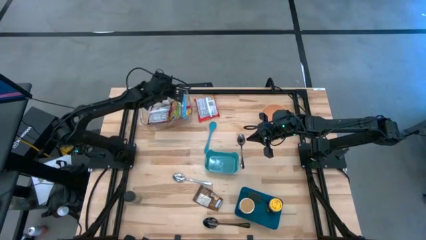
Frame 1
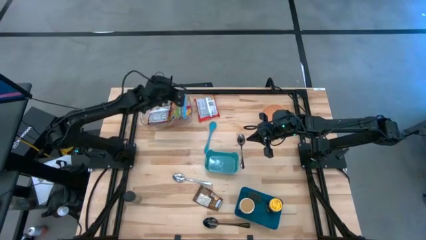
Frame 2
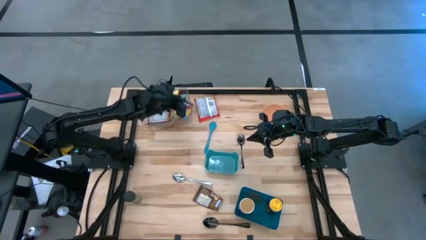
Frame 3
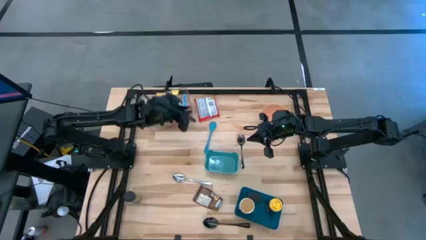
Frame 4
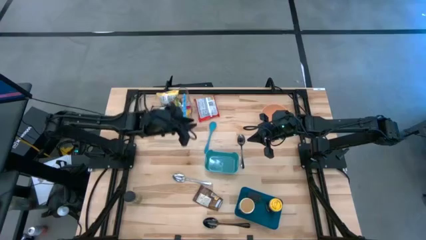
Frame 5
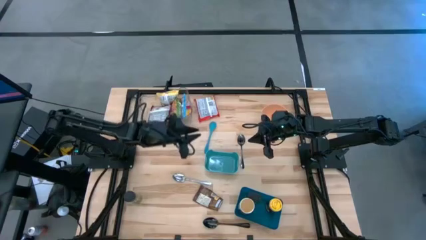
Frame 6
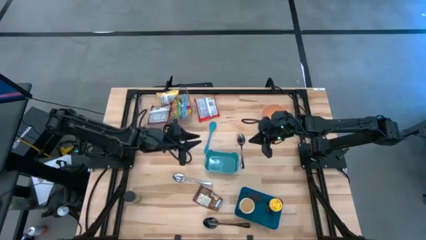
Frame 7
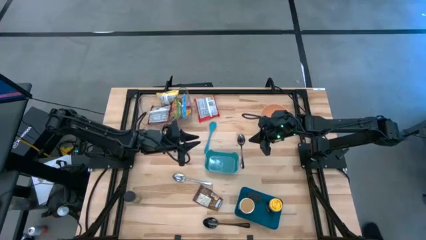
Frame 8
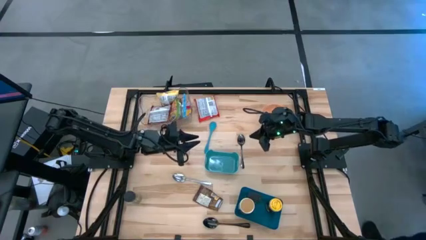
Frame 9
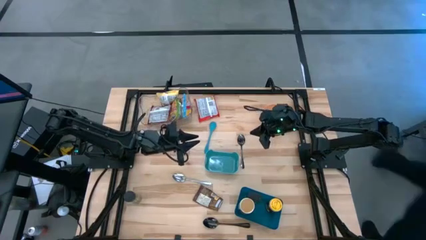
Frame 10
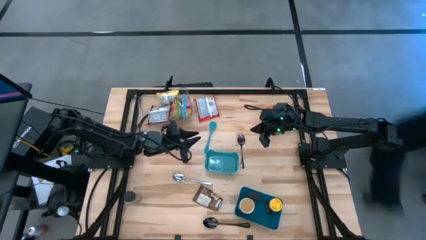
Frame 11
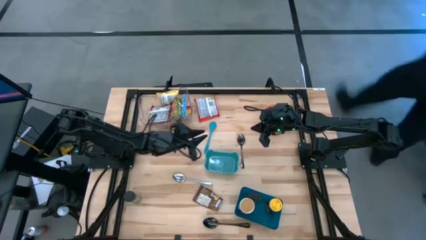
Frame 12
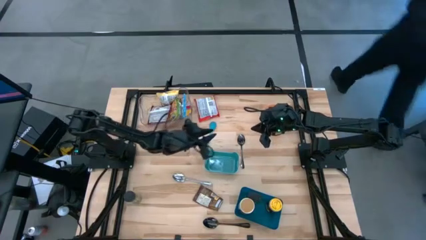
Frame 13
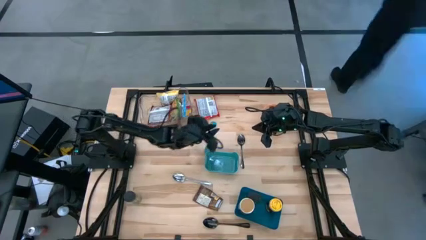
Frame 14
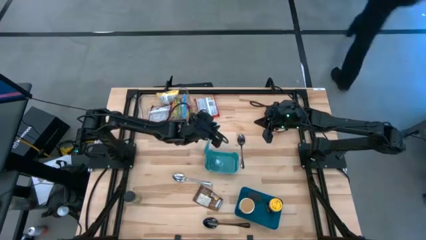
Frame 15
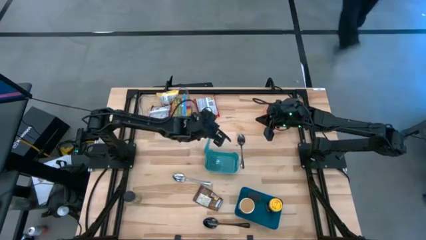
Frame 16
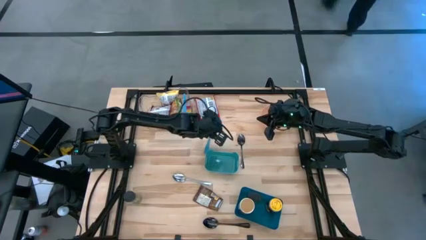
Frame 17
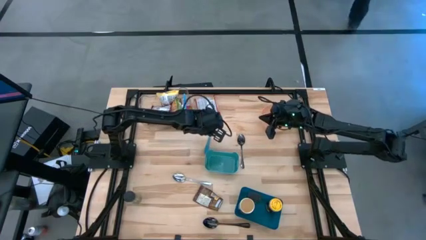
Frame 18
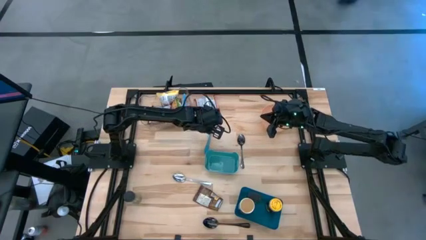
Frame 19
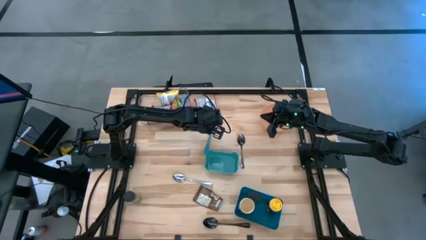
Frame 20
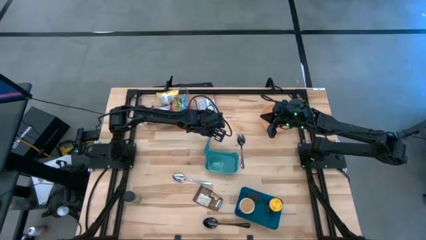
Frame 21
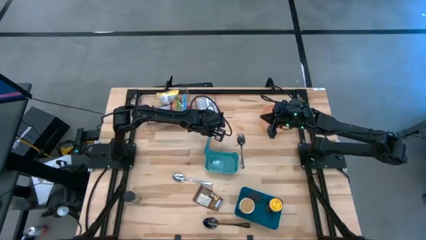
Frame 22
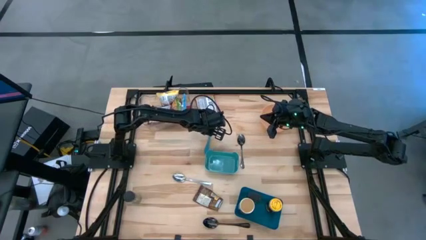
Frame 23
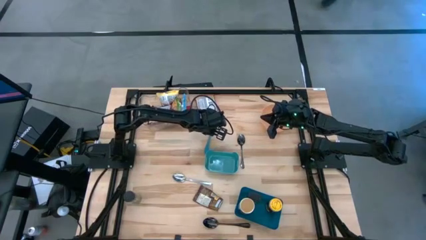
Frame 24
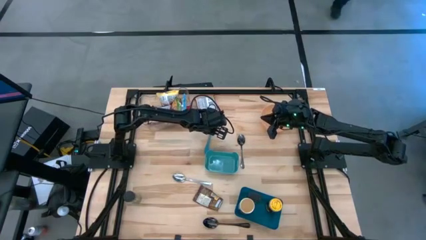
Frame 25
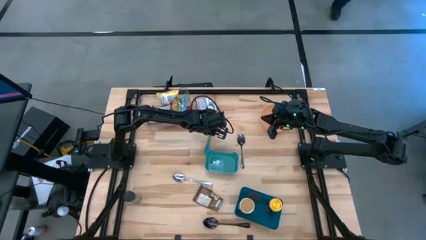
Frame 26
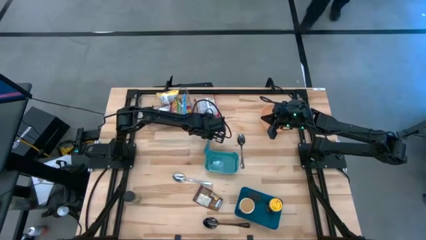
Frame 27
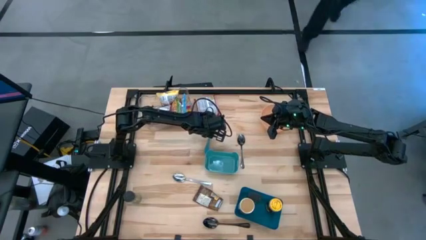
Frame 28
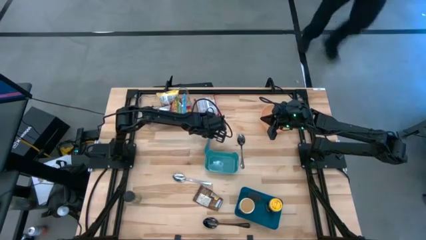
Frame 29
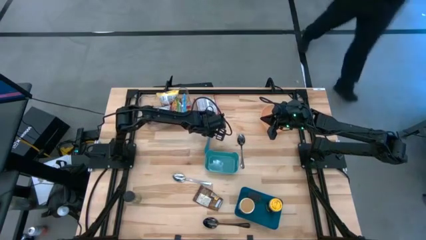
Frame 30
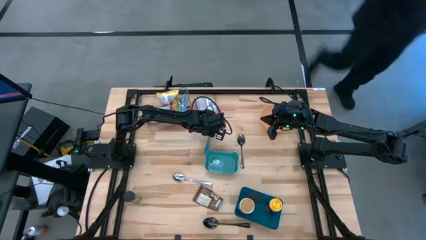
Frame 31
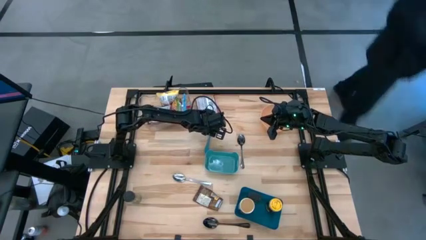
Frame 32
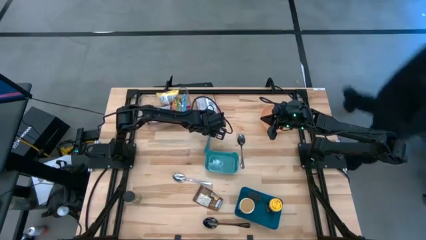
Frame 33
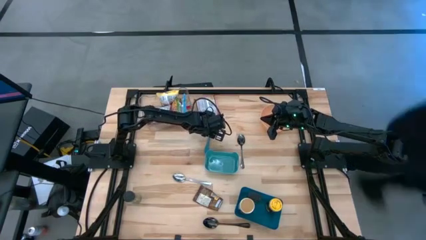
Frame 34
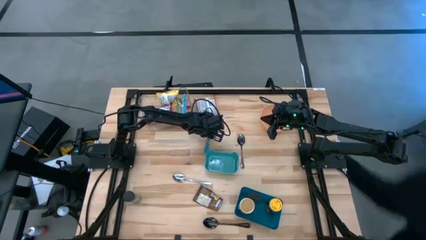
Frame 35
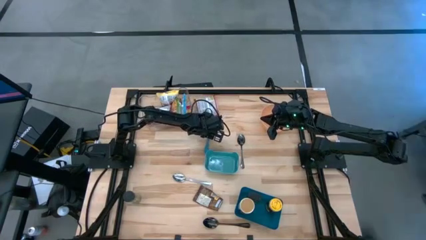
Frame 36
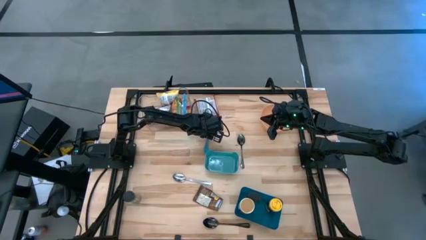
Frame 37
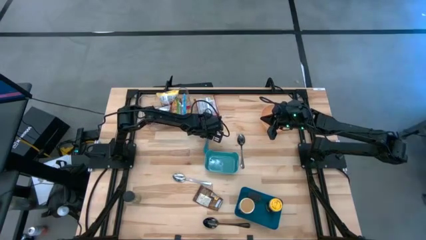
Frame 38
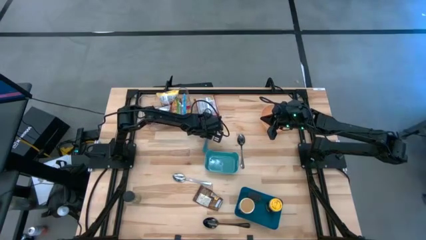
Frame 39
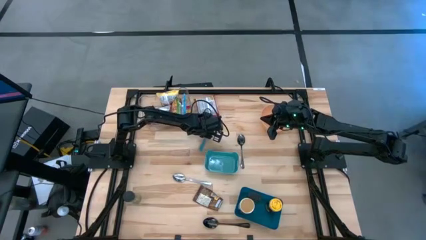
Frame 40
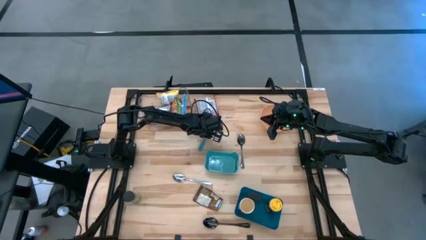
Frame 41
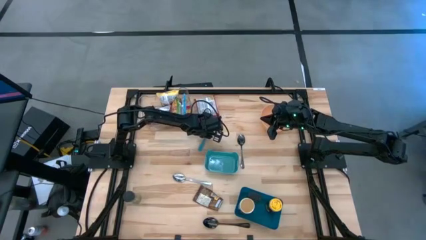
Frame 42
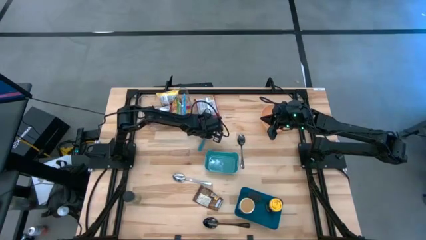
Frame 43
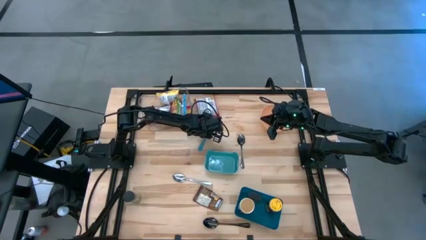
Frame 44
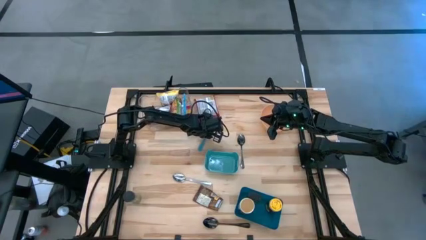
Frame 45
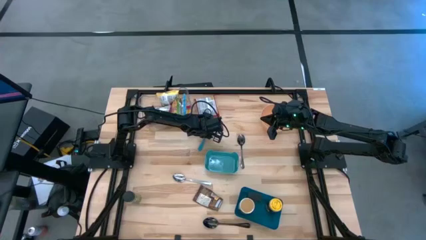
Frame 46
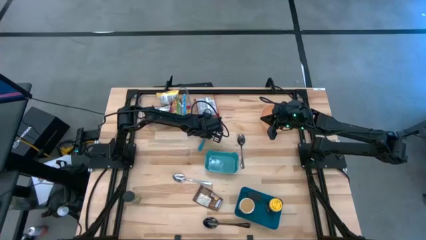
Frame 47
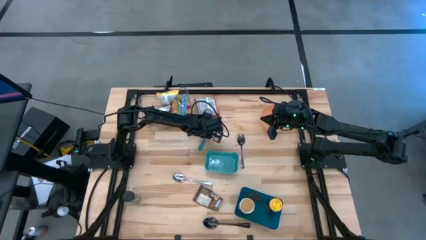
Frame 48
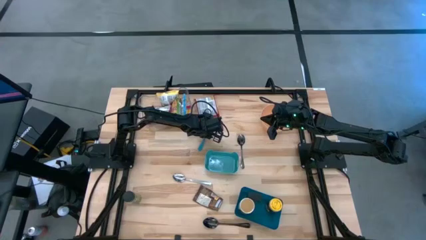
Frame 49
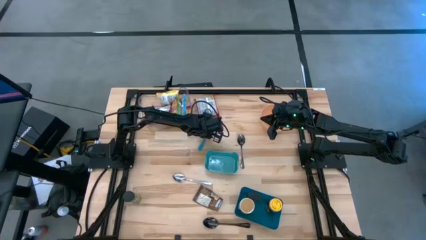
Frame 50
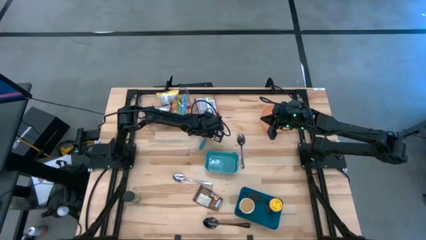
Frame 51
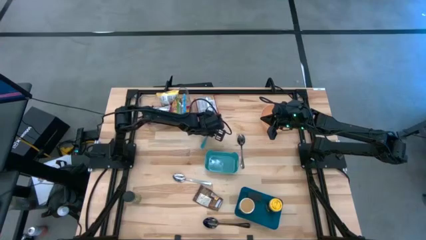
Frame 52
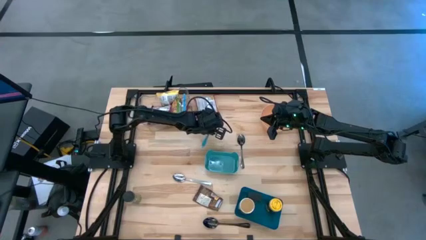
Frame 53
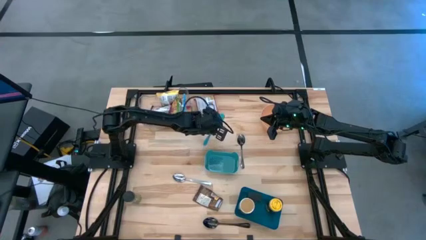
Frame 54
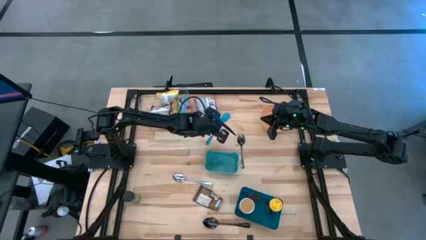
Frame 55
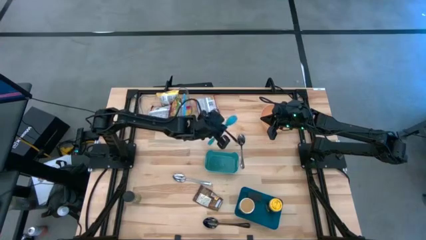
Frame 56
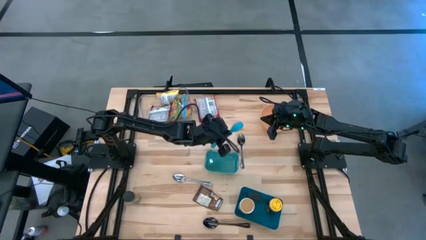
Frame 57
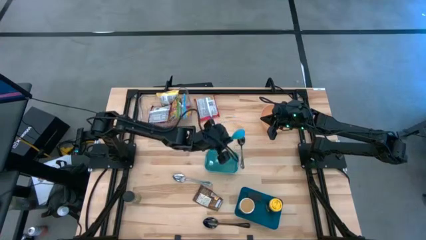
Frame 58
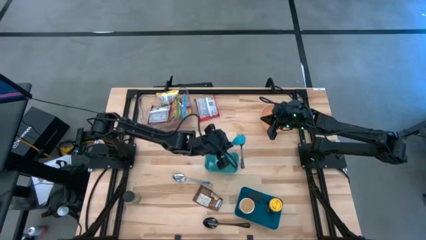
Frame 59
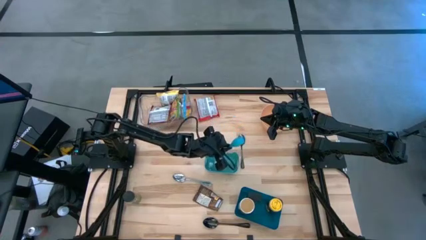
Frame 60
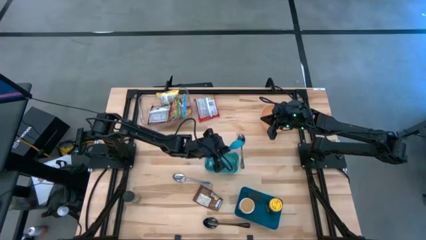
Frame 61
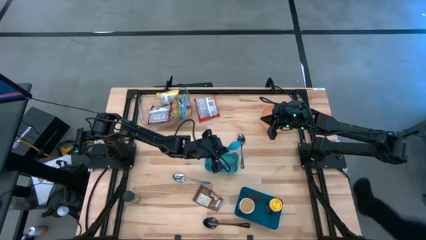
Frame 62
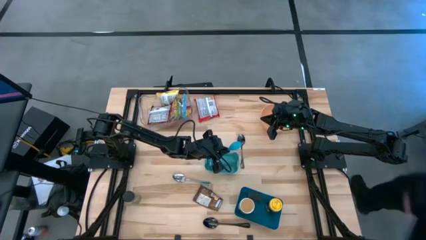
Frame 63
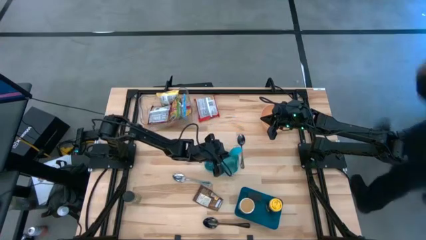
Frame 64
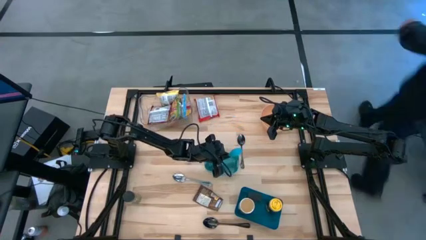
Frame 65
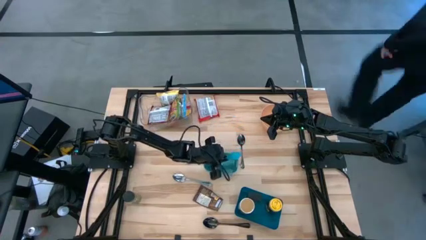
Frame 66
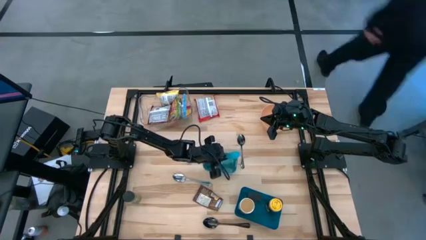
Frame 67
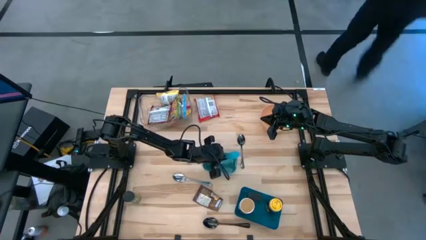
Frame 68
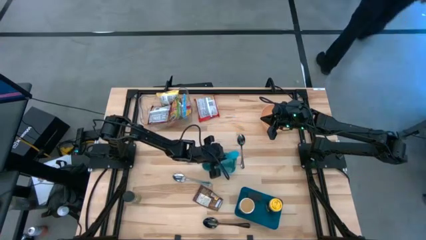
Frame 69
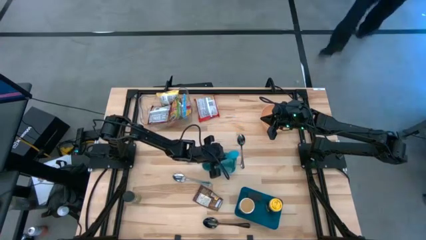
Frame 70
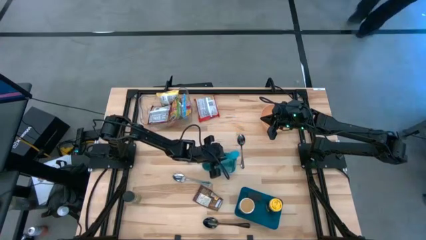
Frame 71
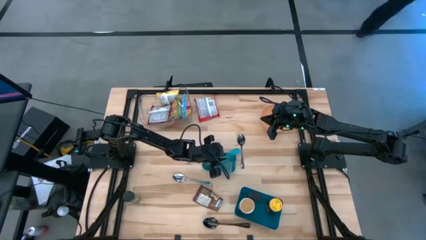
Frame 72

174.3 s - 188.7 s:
Task: Pick & Place Food Item
Put the baby spoon into the green bin
